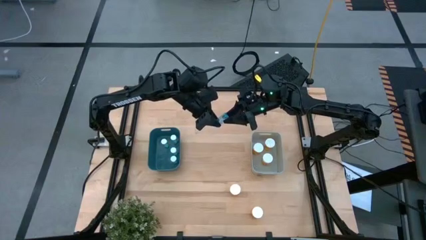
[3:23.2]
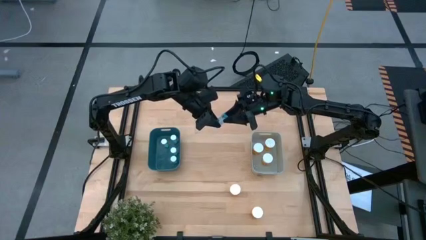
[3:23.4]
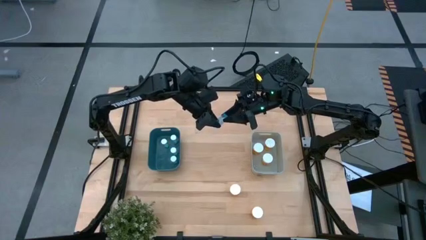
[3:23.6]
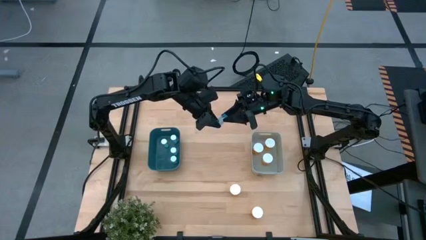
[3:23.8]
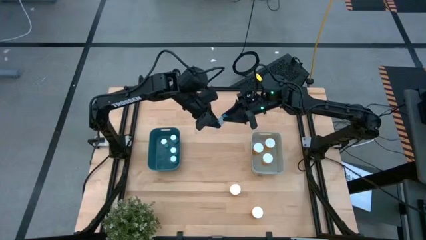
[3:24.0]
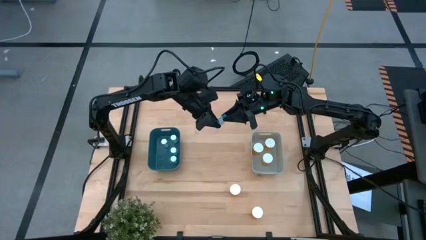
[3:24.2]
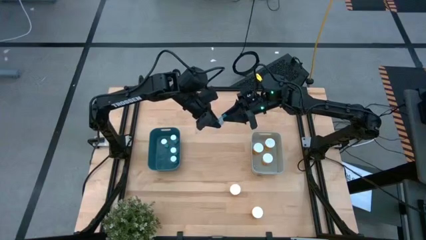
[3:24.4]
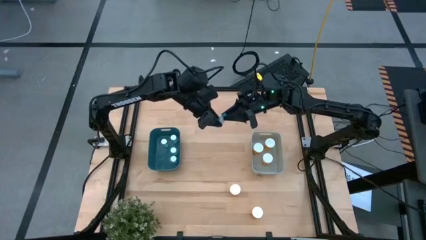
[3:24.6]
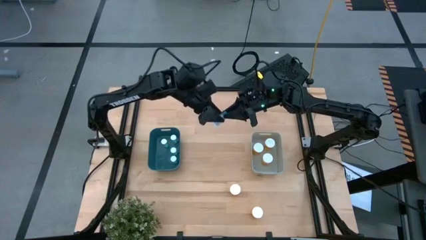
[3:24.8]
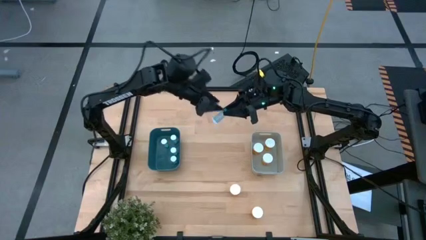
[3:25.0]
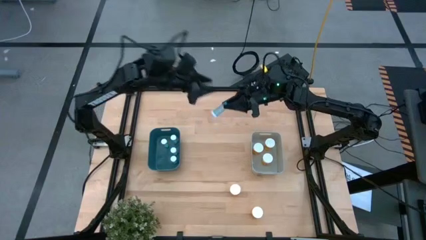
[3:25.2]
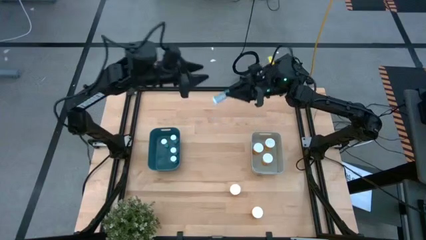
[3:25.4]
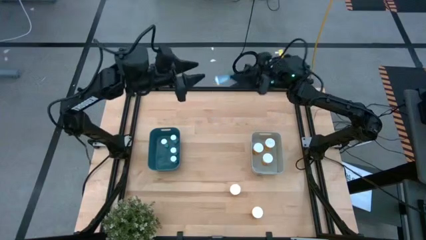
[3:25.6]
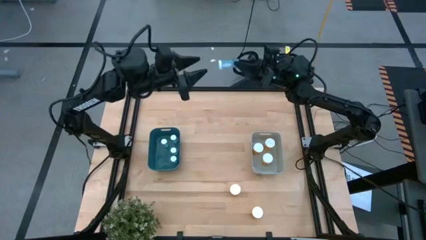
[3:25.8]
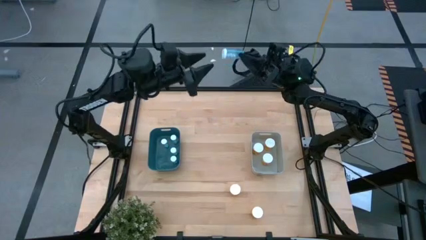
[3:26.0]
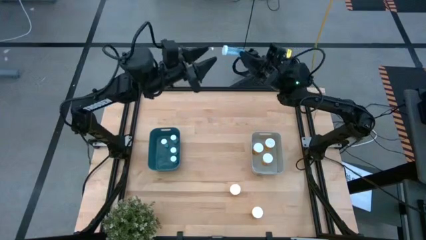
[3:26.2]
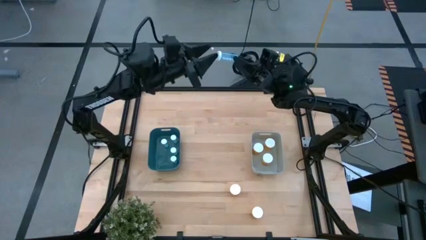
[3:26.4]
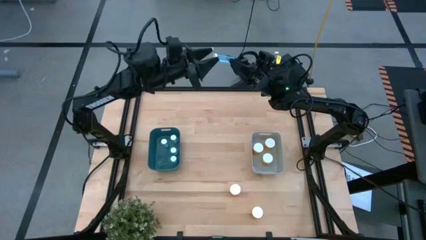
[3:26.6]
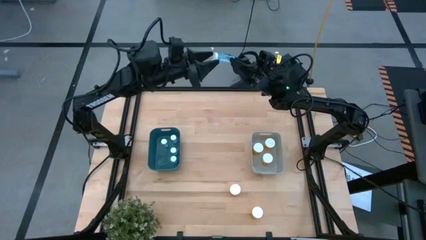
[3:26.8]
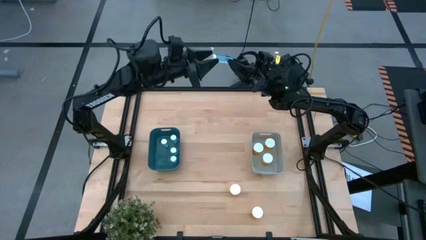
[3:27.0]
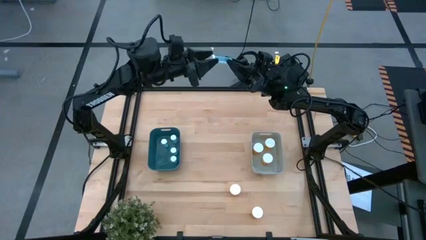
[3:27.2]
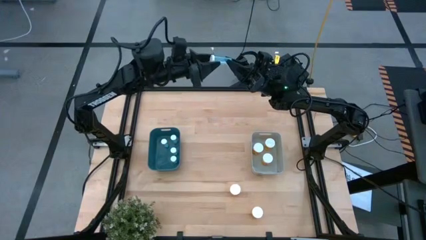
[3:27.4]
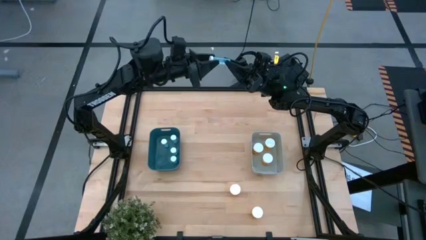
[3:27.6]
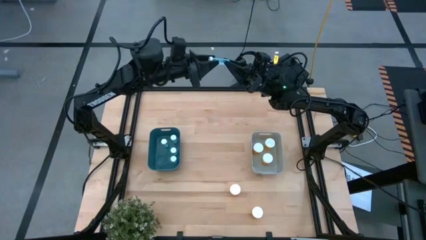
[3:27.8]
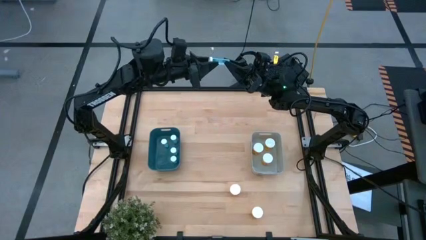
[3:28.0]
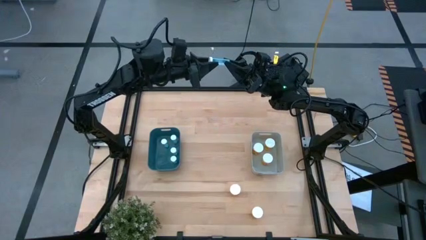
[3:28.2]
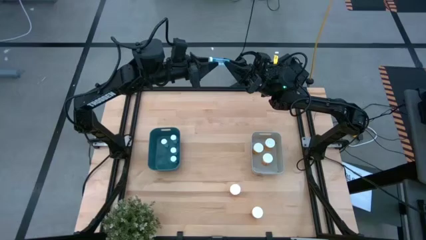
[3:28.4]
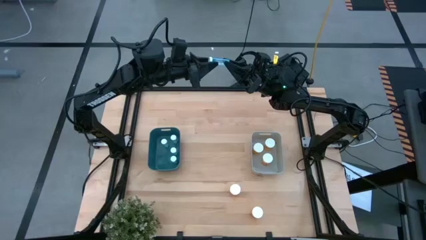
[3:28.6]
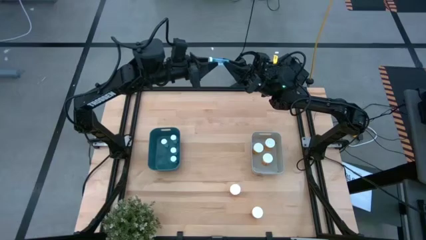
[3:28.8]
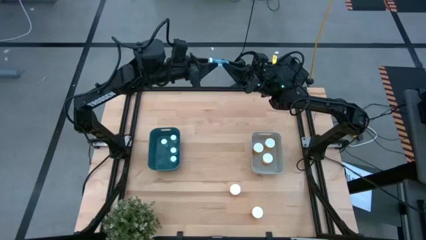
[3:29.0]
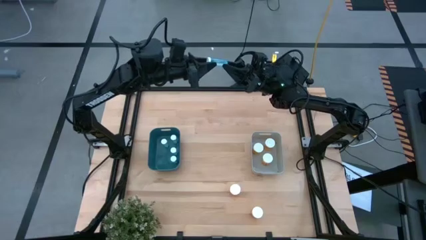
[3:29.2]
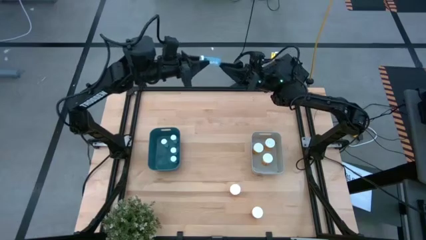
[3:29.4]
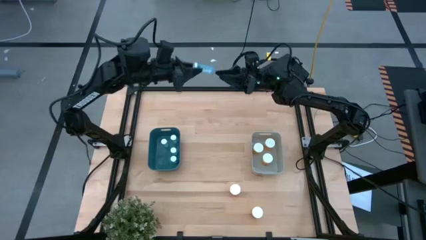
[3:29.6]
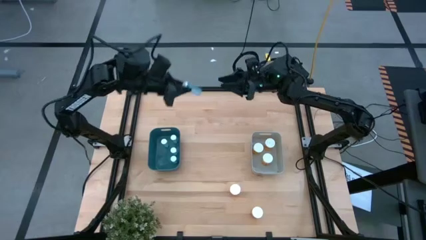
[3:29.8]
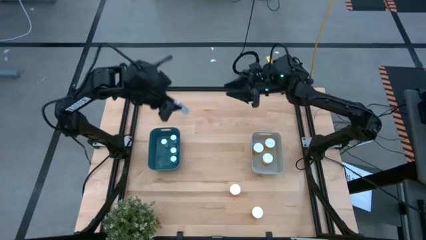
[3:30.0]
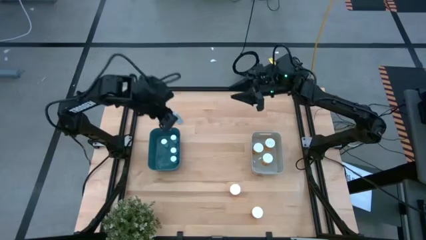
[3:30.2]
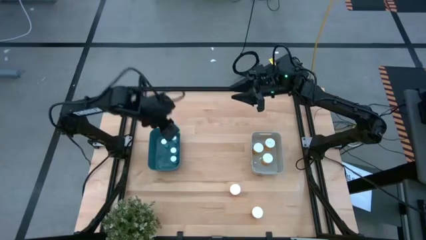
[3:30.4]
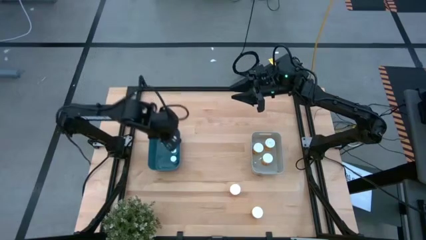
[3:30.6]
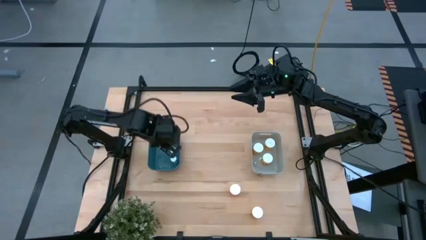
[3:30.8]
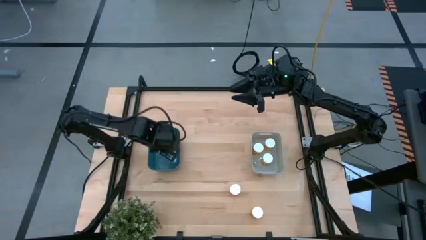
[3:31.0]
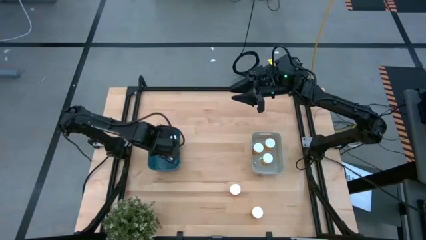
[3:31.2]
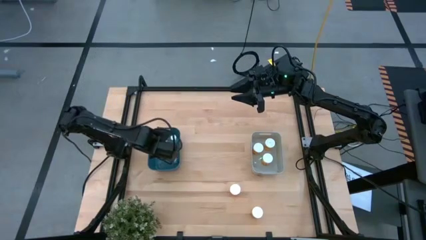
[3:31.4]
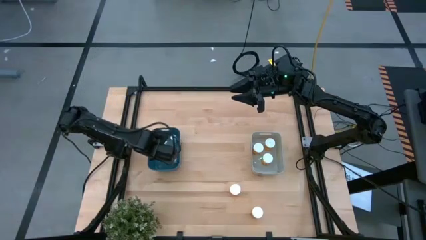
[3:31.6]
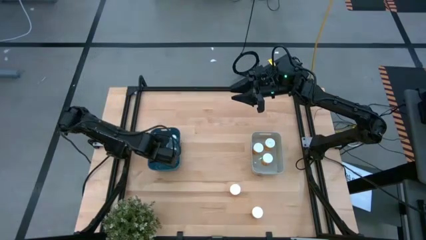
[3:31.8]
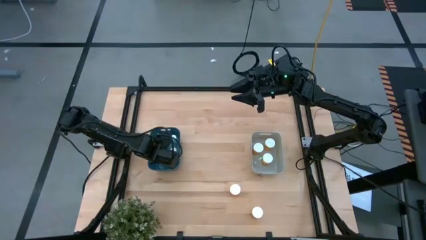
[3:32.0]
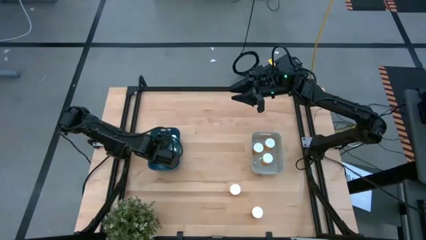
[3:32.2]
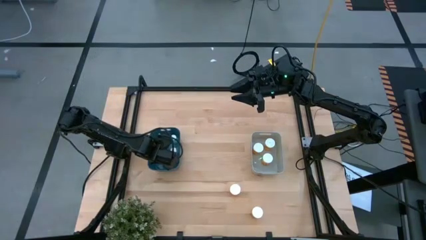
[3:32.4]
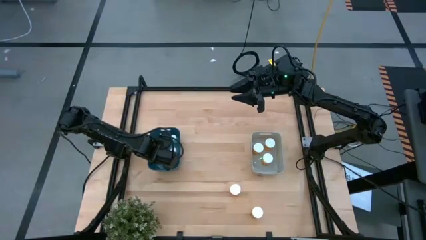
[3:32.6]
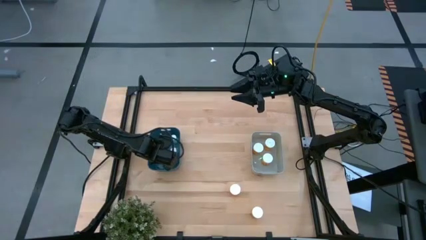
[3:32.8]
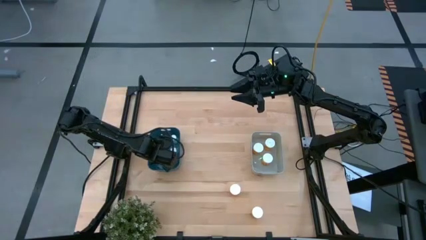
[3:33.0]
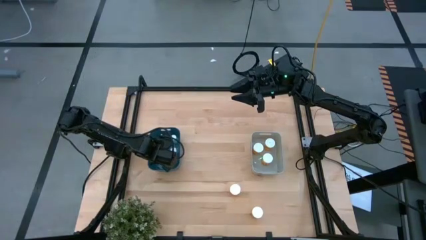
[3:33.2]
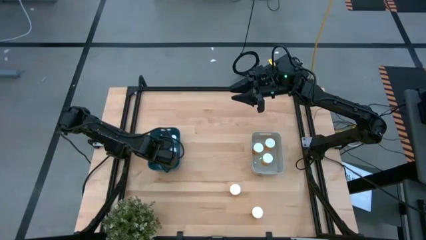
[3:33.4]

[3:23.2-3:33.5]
Task: Pick and place medicine bottles into bin by pill shape (circle, oval)
Adjust the blue pill bottle

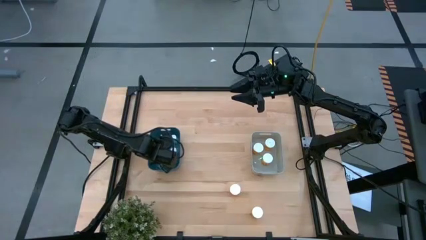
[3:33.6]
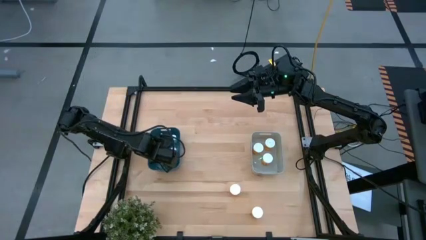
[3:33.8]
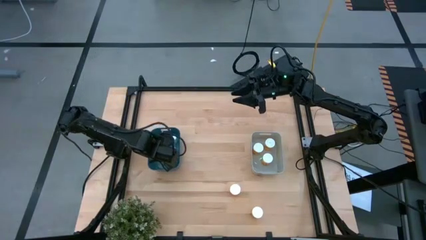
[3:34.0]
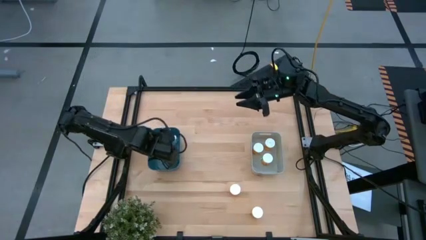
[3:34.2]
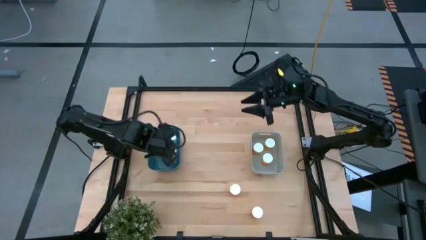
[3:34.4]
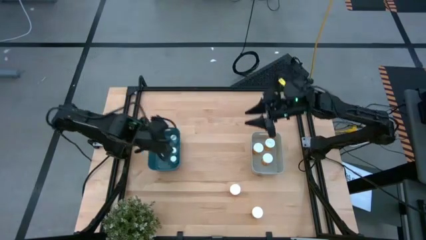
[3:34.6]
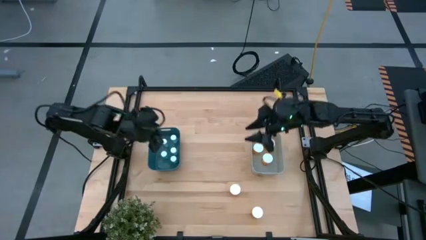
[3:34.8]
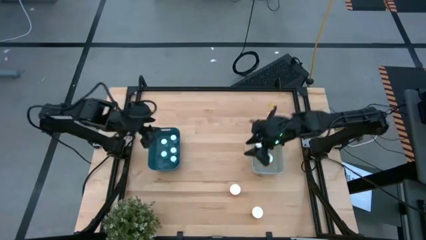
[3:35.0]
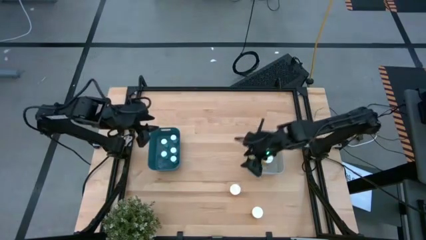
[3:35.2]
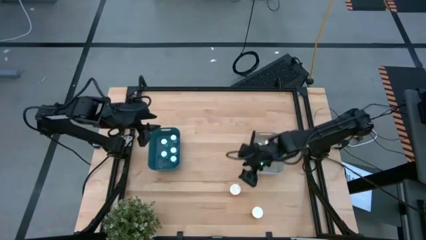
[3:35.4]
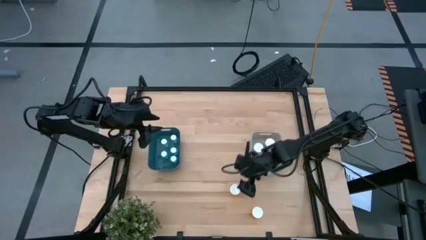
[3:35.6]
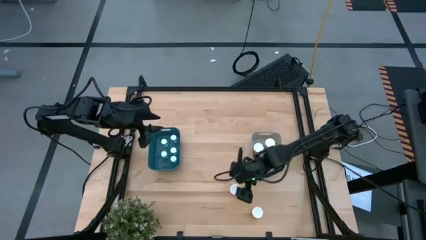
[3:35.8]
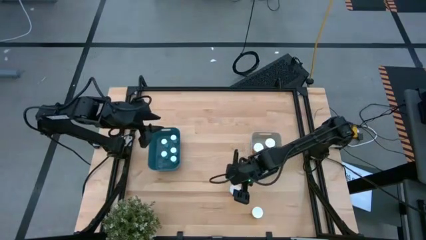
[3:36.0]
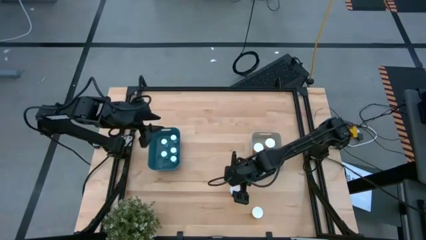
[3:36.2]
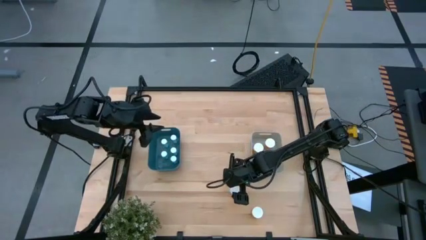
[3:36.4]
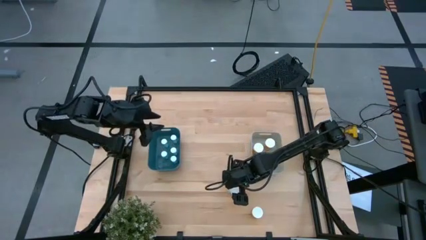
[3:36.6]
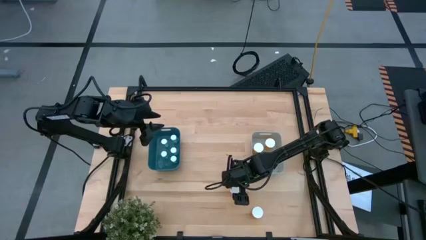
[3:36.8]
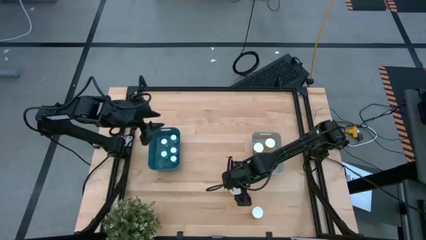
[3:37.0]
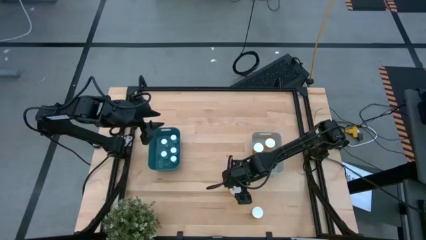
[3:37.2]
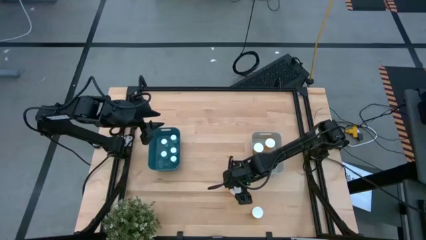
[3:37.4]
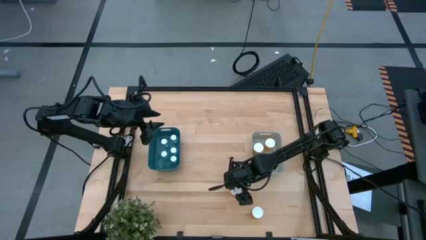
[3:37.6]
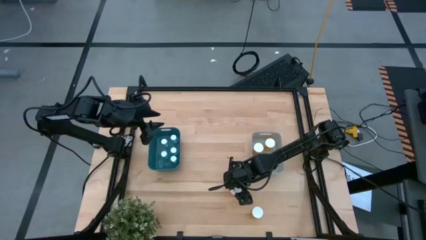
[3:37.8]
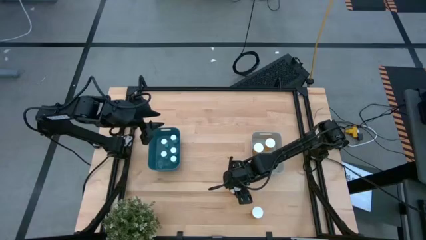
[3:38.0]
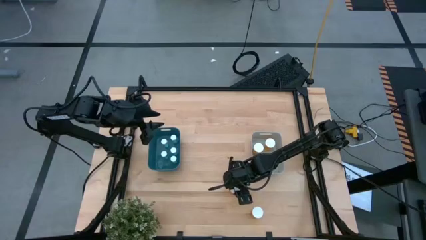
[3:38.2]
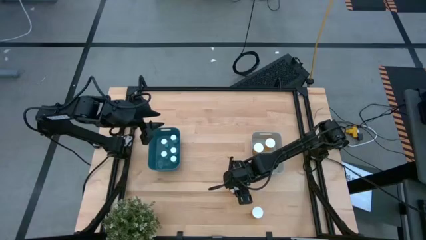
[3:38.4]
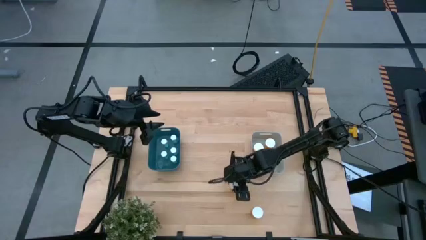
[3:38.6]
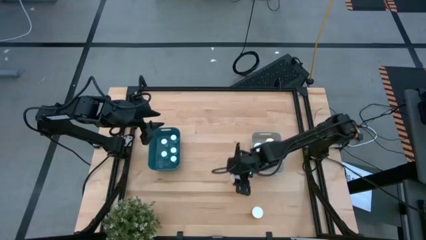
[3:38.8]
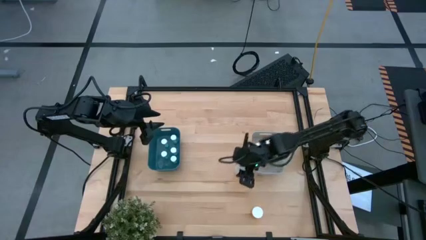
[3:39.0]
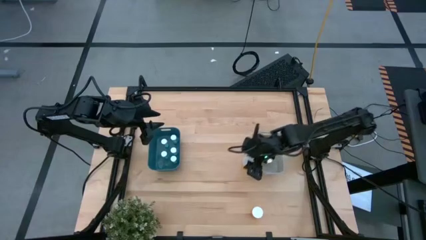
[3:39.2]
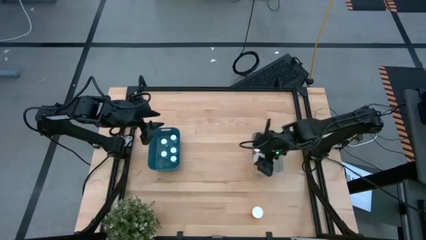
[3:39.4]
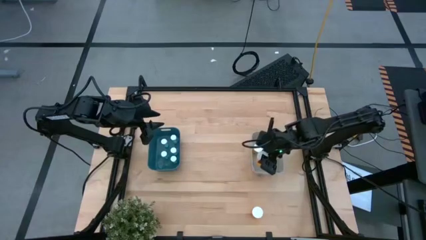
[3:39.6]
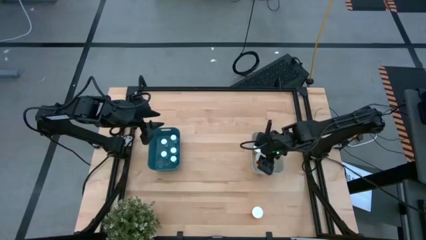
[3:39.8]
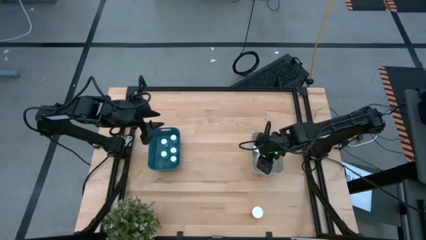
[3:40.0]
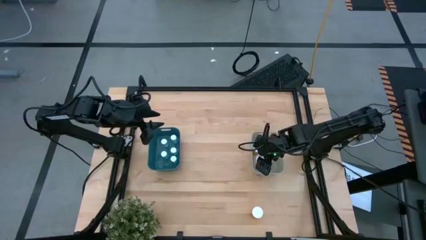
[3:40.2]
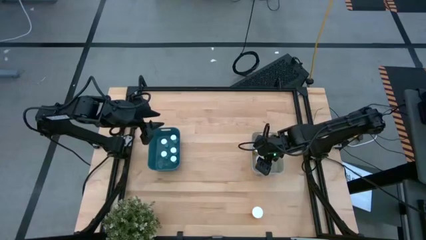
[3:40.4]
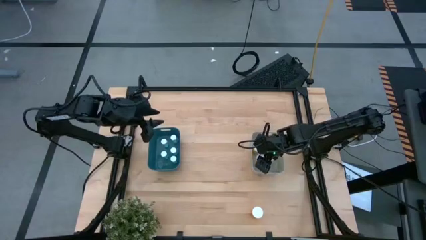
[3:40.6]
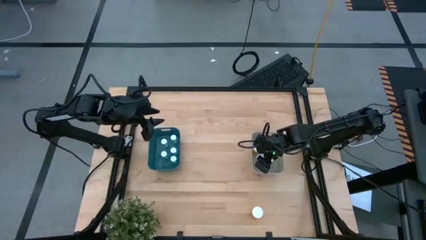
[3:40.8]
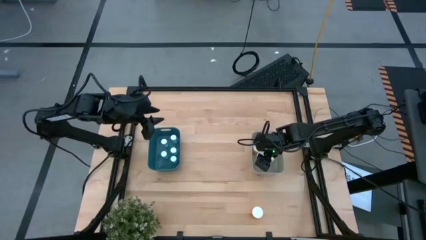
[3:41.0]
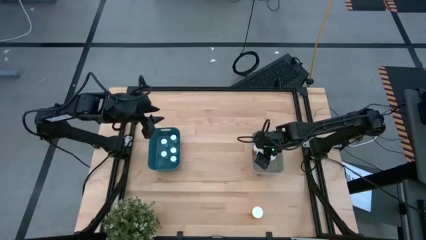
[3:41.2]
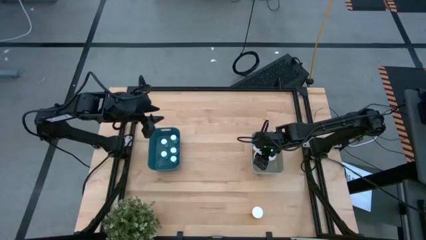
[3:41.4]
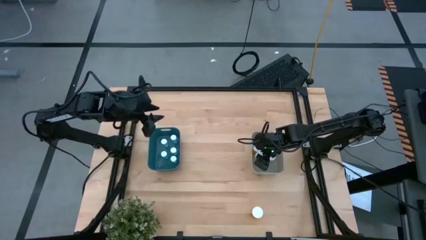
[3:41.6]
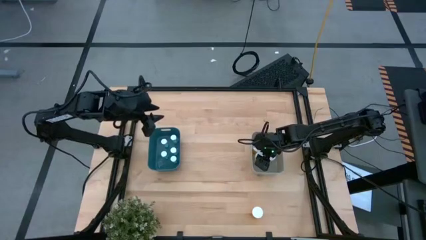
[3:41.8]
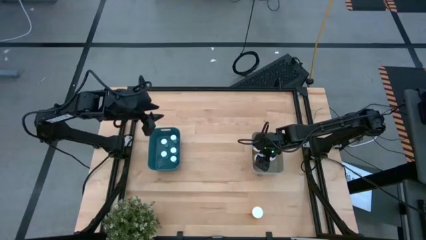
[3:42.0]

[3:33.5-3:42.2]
Put the orange pill bottle into the gray bin
